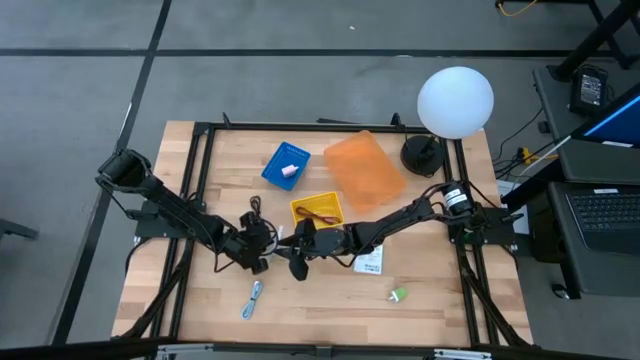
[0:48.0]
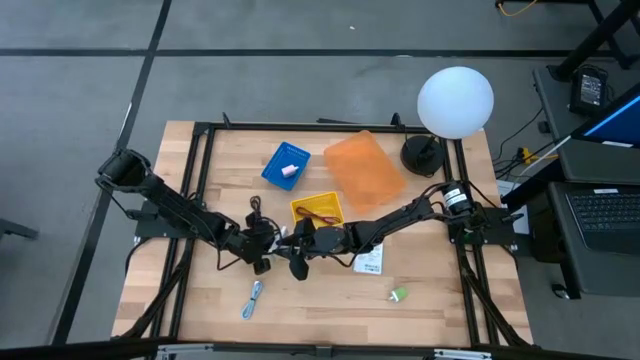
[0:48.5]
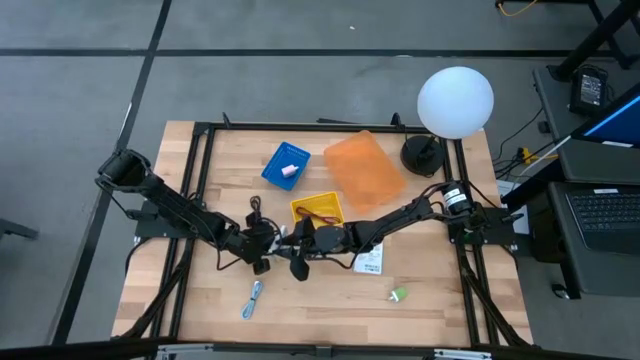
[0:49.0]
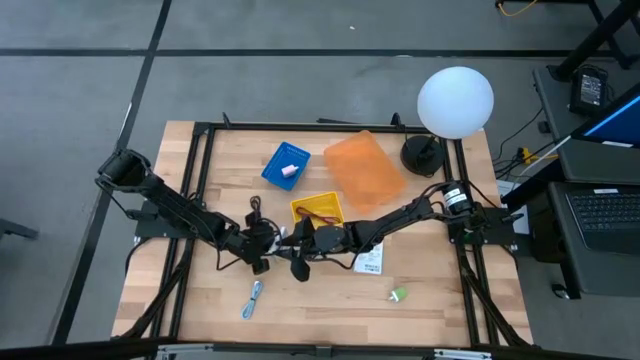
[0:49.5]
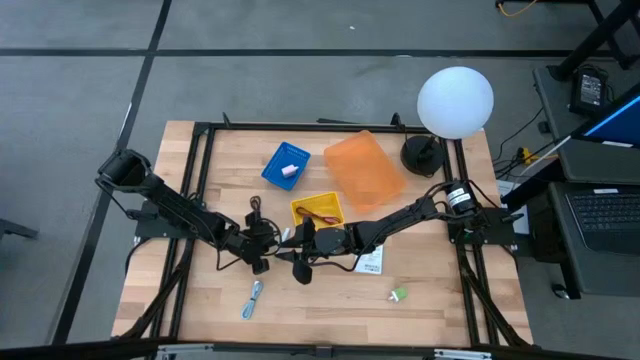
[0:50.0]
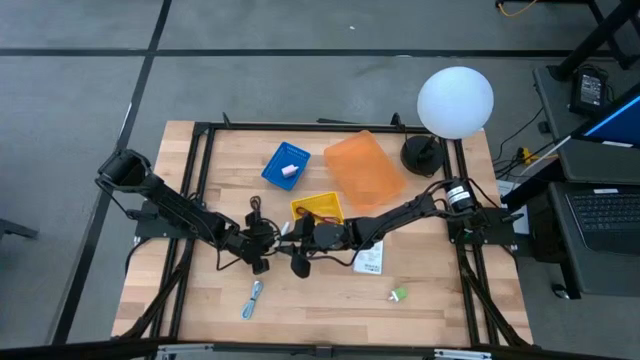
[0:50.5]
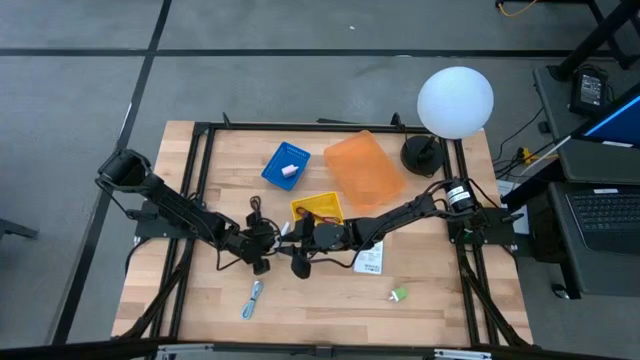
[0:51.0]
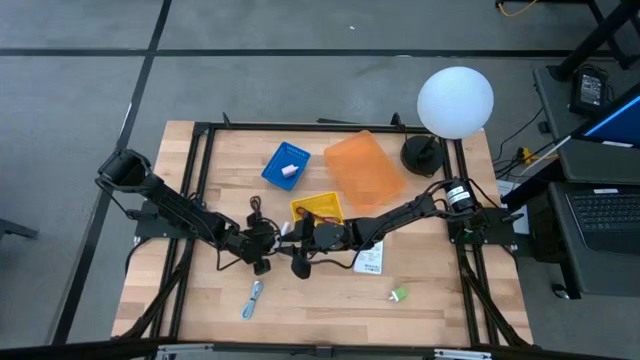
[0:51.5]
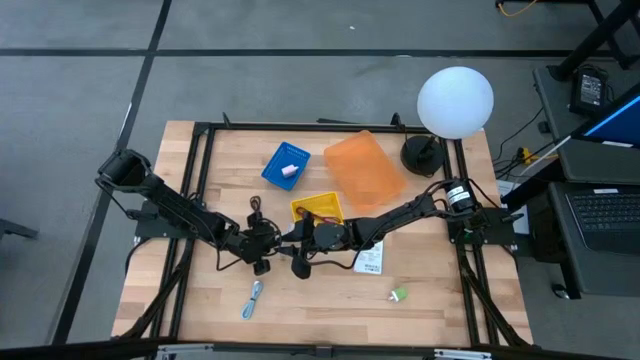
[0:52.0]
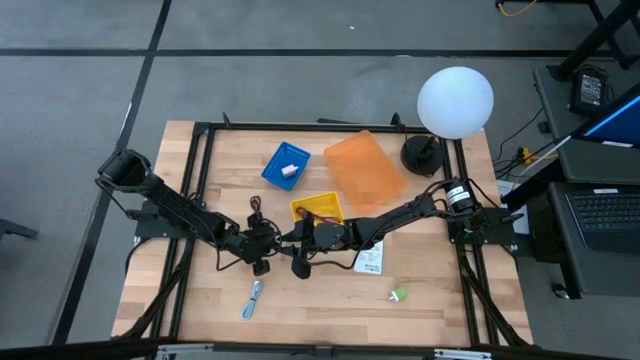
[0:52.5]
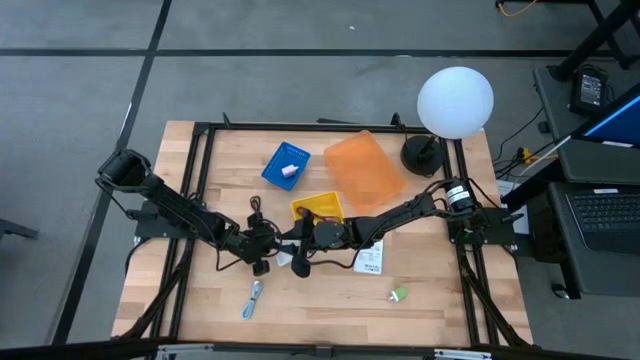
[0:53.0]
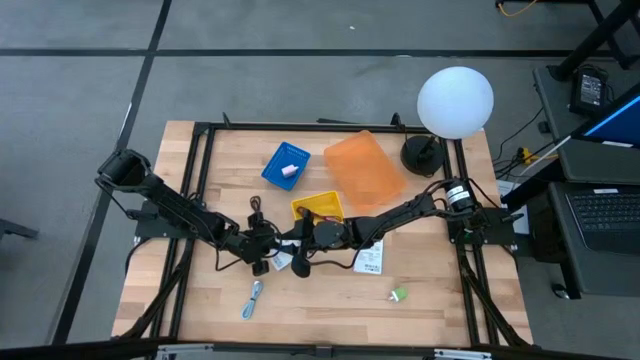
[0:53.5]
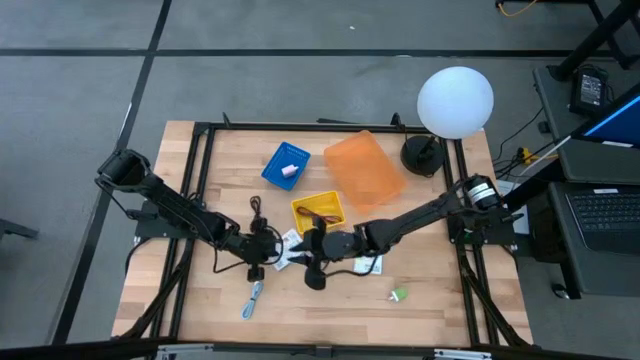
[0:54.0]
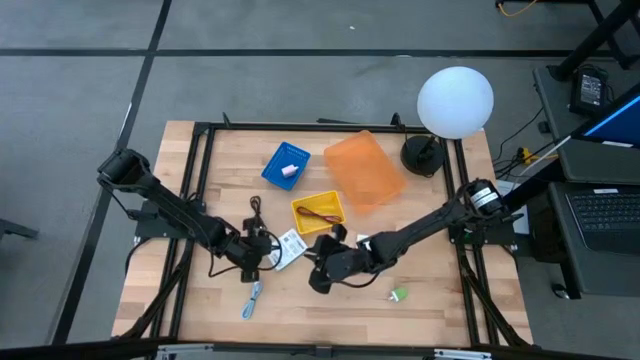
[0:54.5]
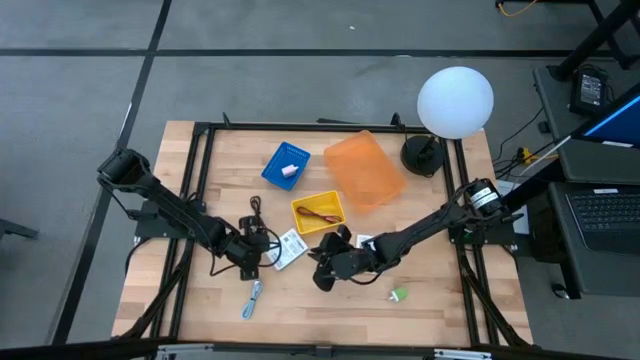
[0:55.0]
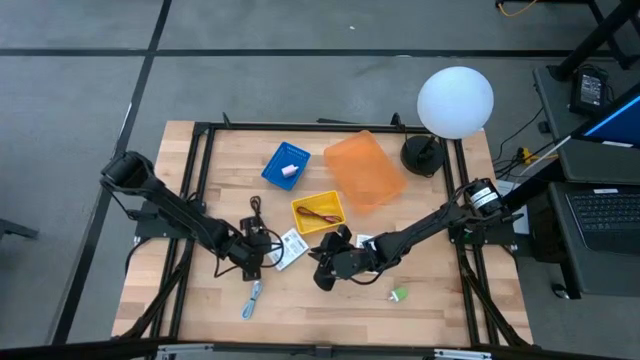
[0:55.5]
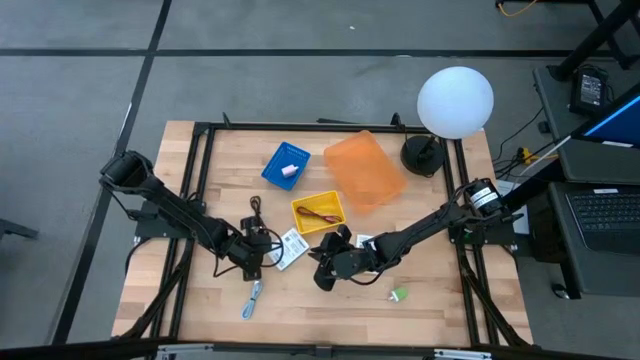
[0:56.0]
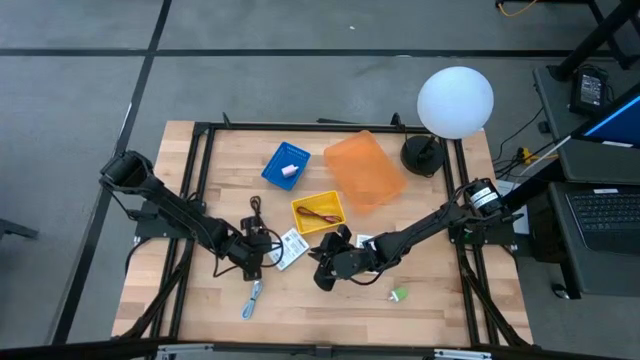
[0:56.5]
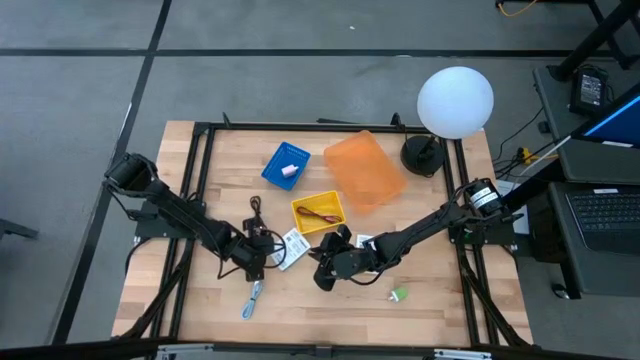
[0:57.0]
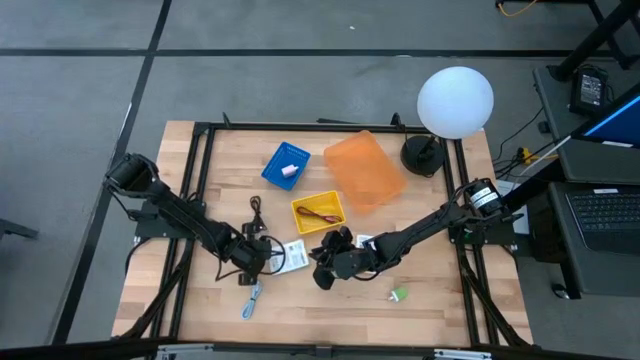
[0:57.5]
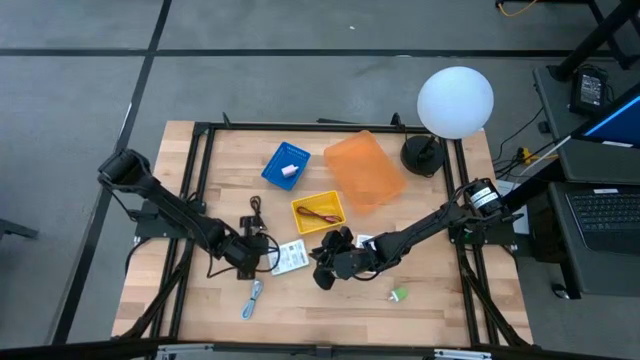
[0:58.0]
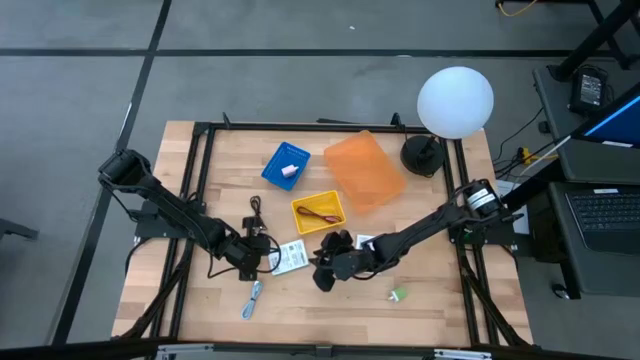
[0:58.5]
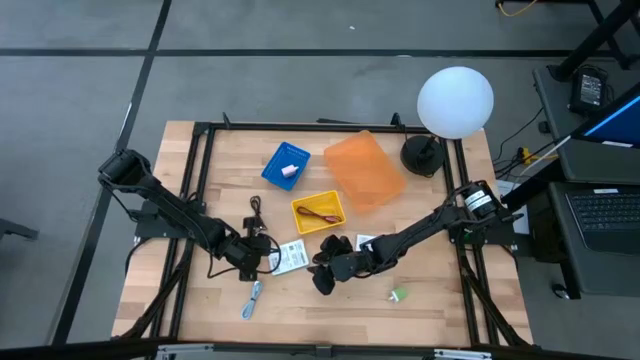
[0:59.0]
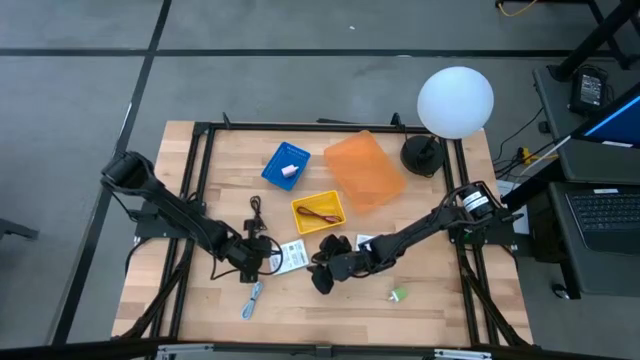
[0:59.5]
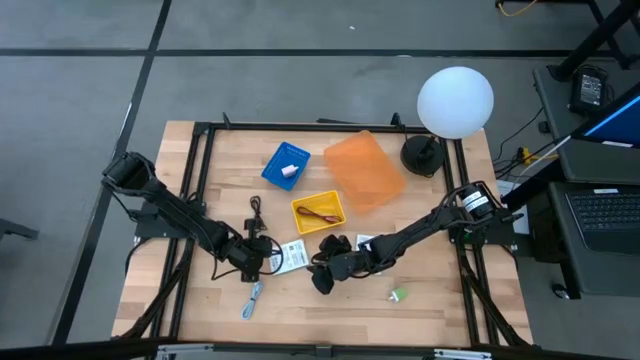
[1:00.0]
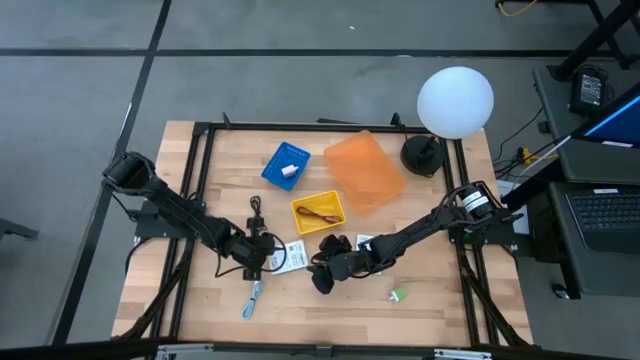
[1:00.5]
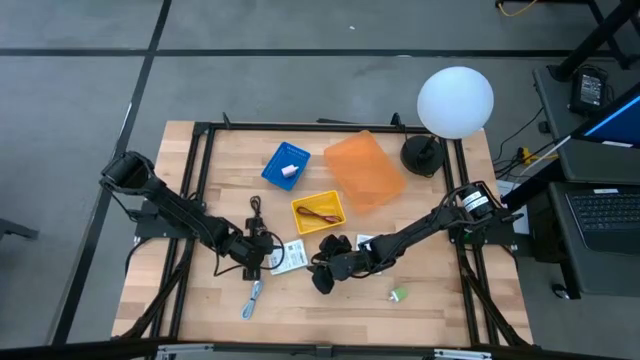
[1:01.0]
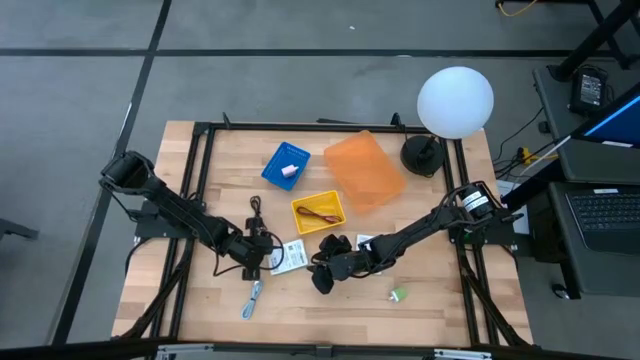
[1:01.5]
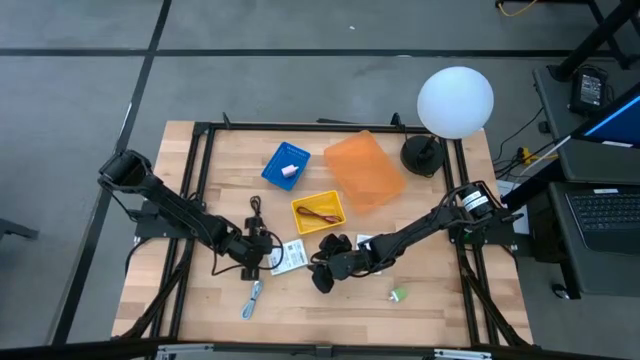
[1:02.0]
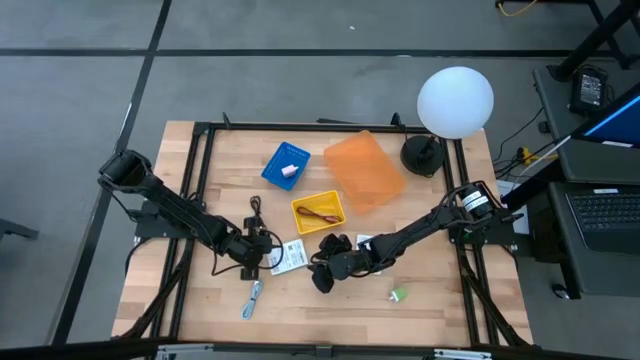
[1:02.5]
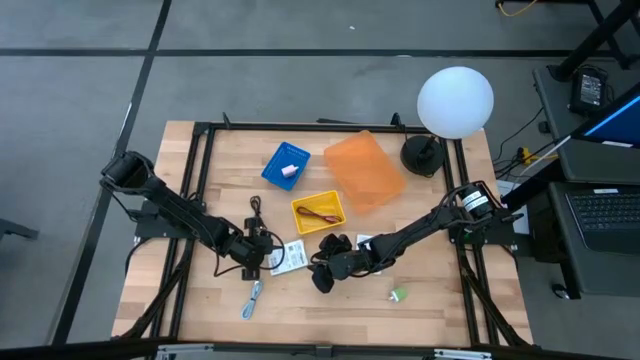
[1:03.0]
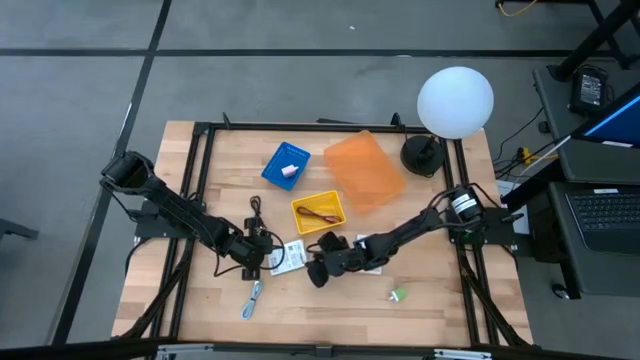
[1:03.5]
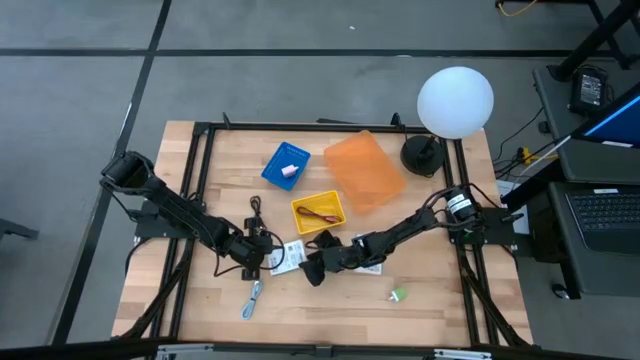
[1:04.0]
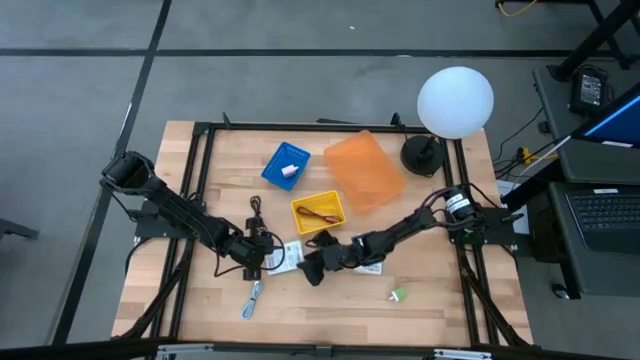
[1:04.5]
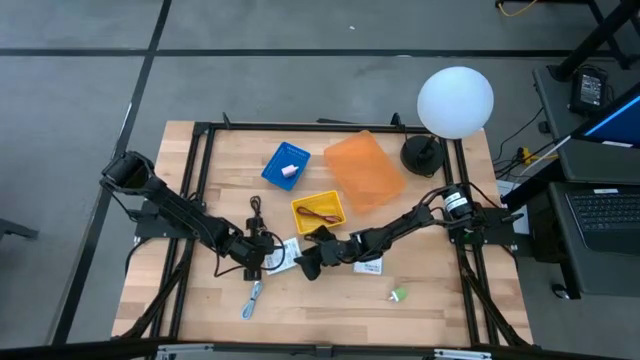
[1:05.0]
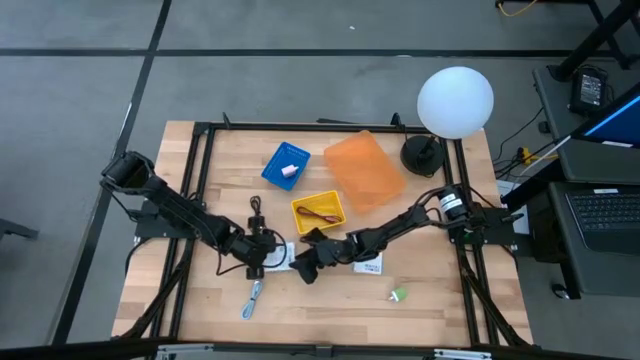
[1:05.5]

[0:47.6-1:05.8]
Task: Pick and place items into bin
Put the white card reader box into the orange bin
